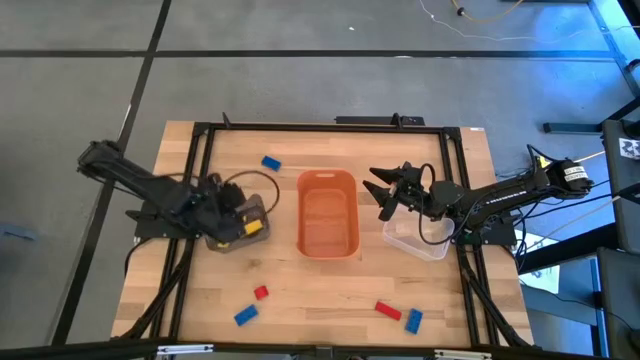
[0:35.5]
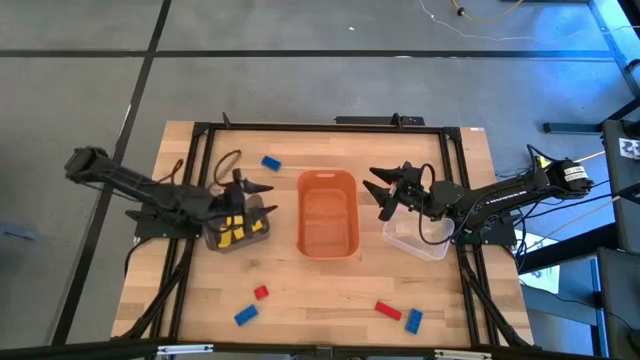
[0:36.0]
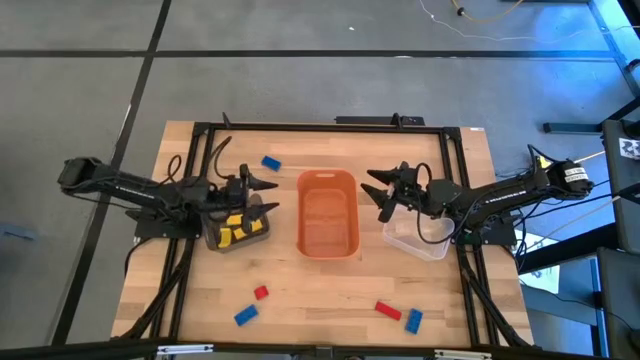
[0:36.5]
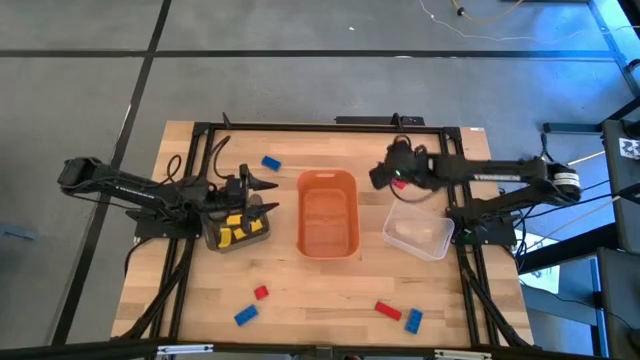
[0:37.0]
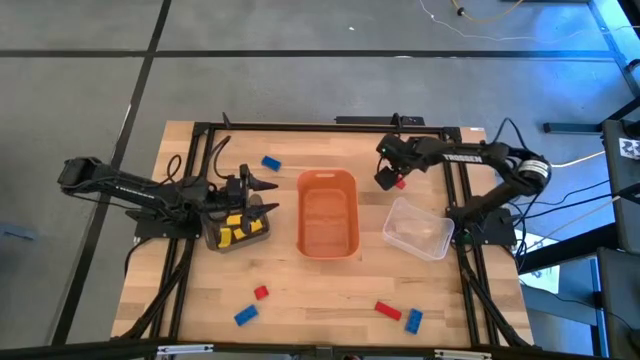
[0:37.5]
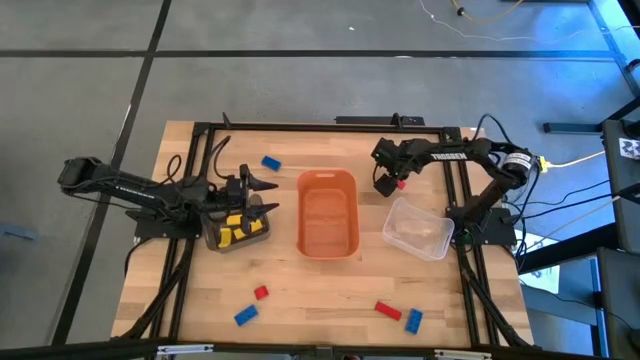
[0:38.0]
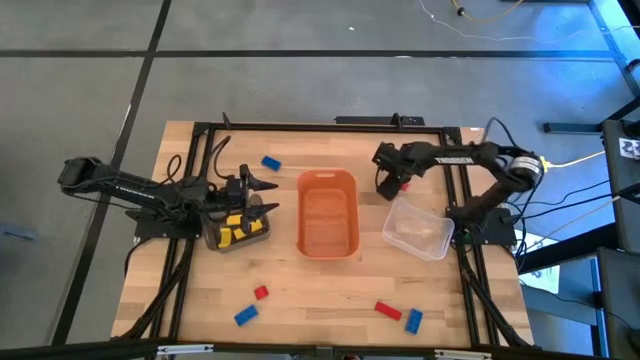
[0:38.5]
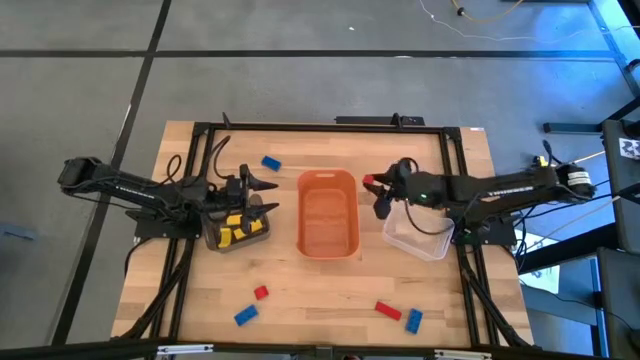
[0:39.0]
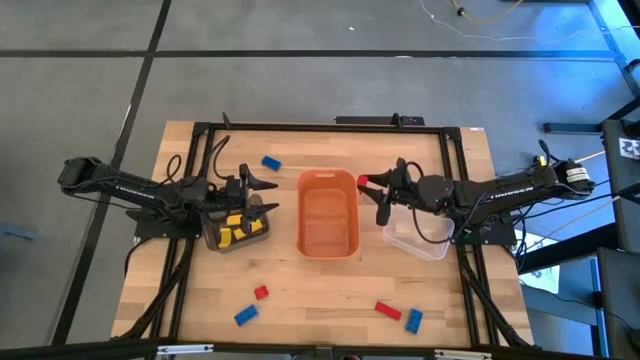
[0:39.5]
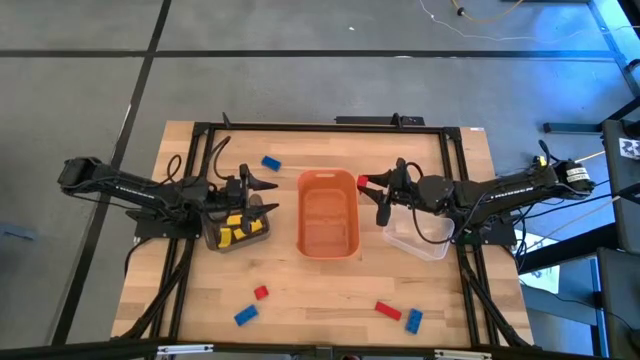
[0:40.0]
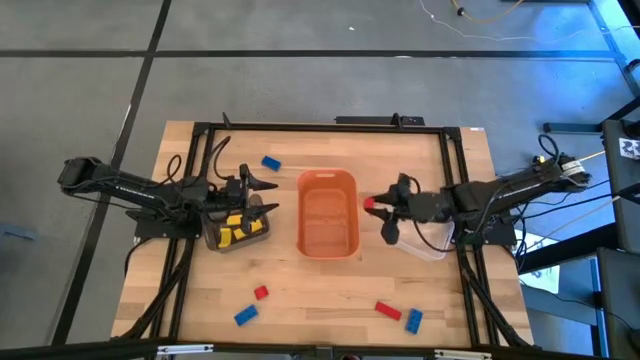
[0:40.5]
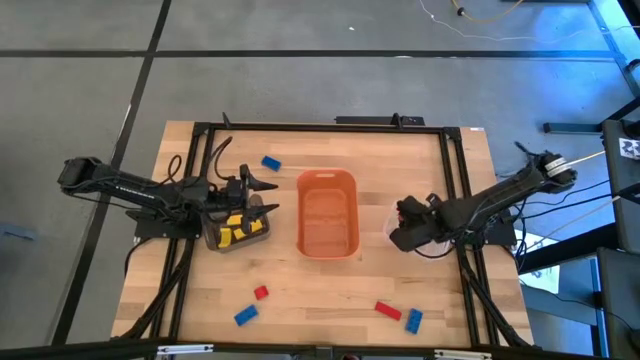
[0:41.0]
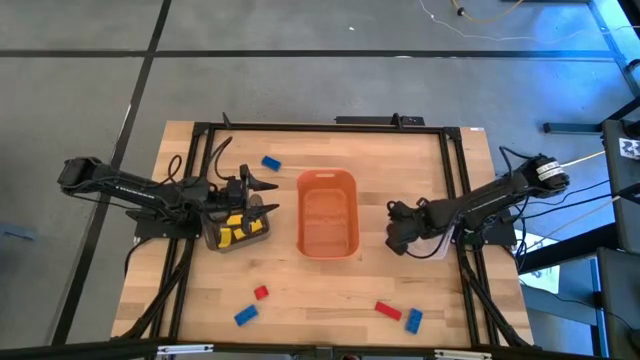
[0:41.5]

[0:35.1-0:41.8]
Task: Sort & place blocks by color
Put the top red block into the transparent bin

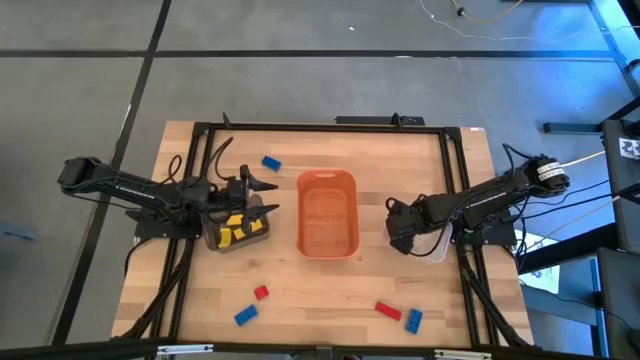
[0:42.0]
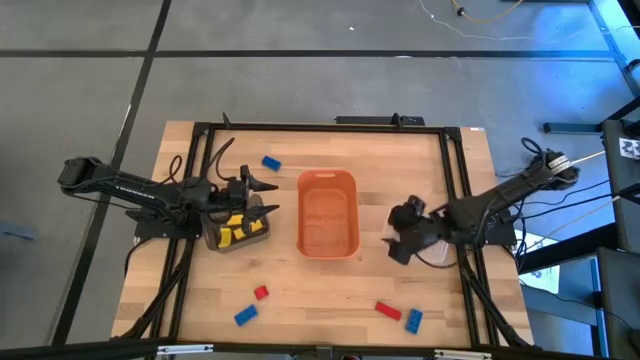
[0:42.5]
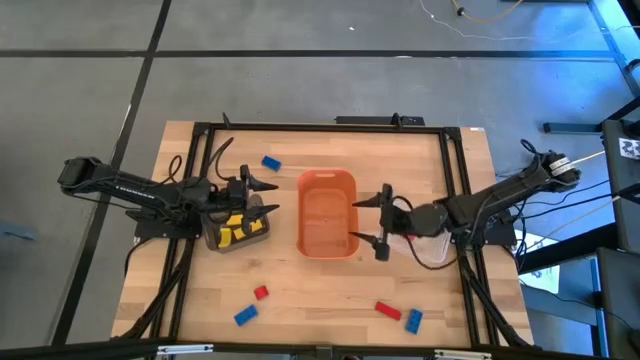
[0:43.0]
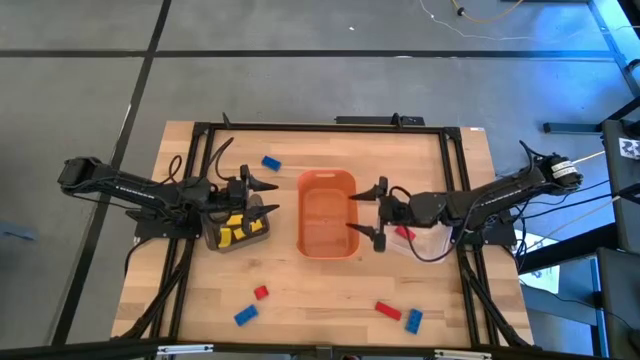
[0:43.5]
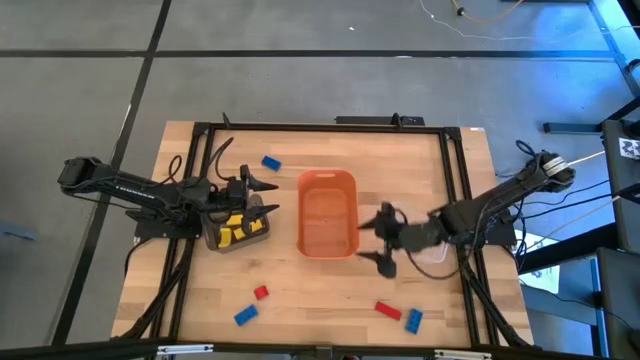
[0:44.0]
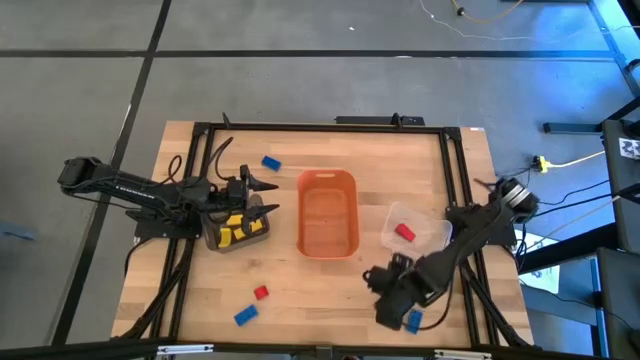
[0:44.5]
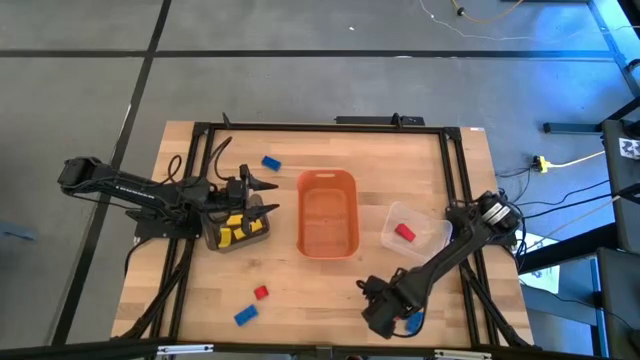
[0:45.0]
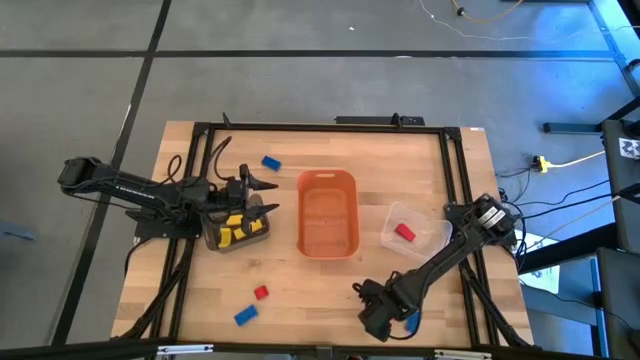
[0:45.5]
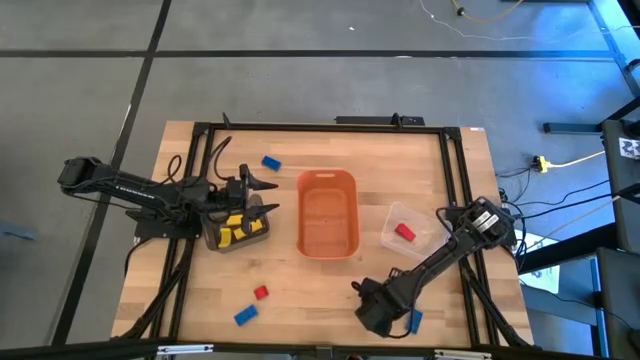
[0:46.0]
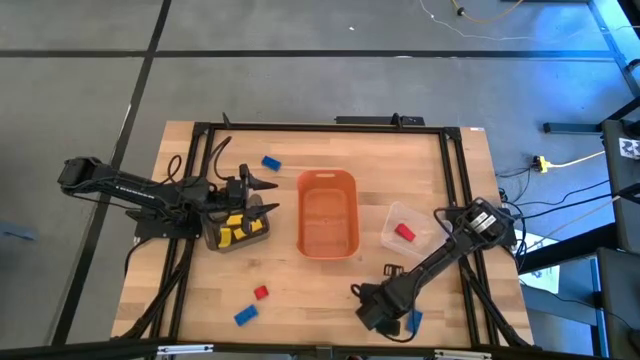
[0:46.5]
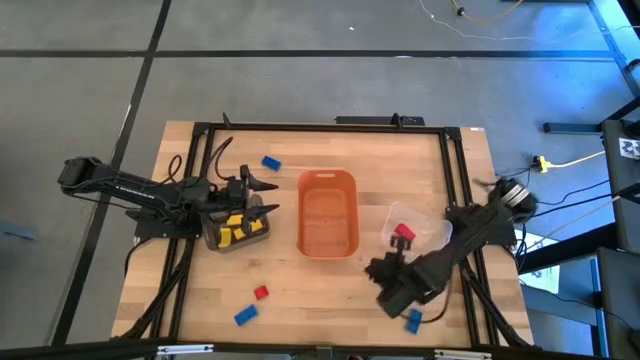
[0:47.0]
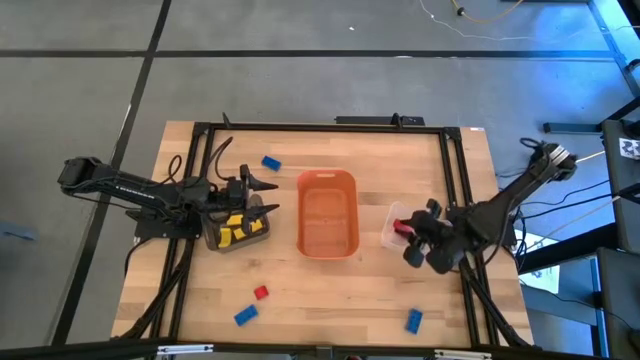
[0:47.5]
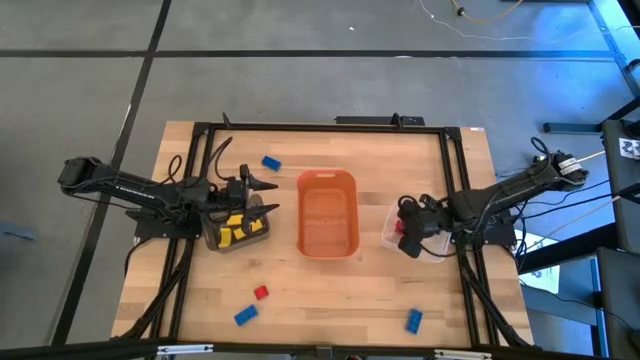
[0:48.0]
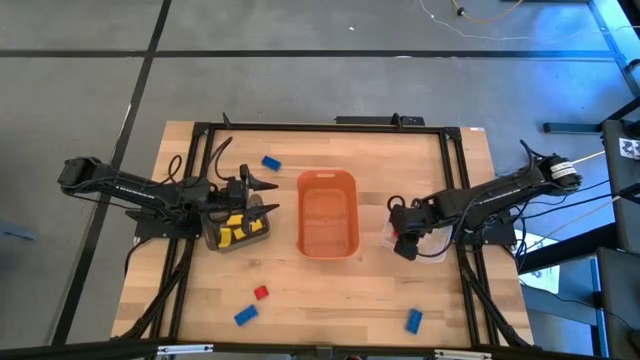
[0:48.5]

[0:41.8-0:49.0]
Put the right red block into the transparent bin

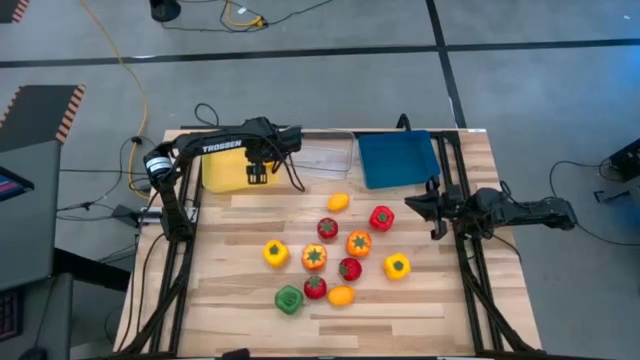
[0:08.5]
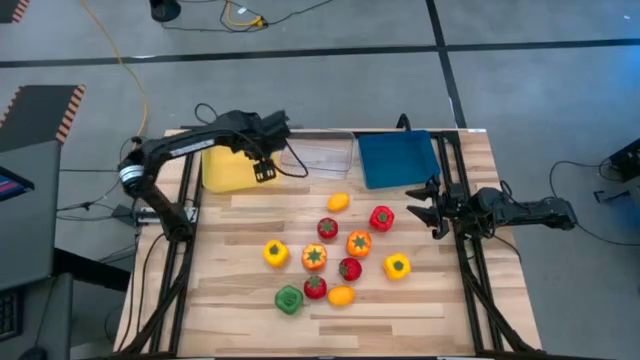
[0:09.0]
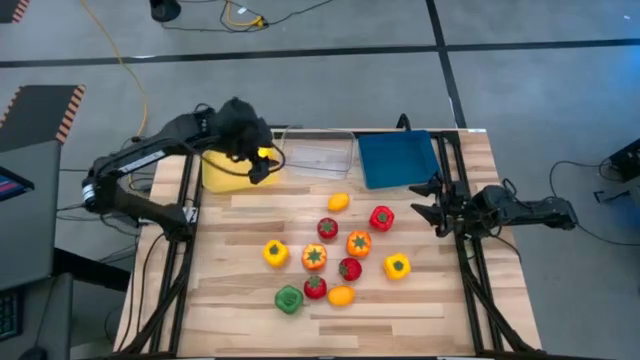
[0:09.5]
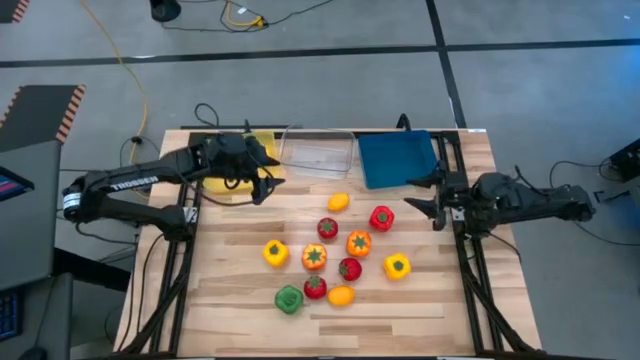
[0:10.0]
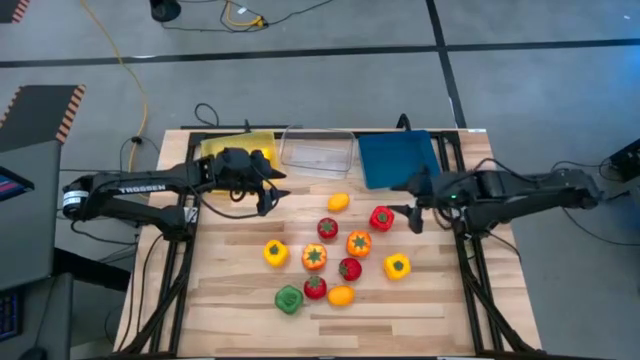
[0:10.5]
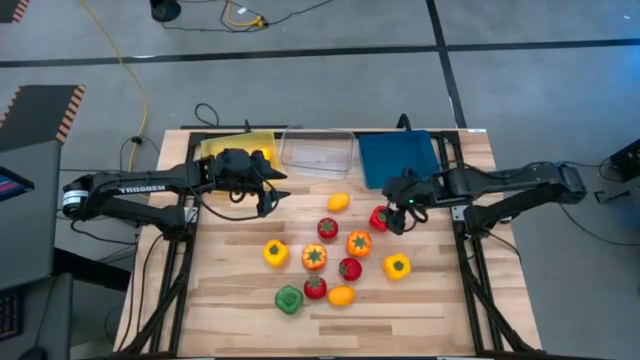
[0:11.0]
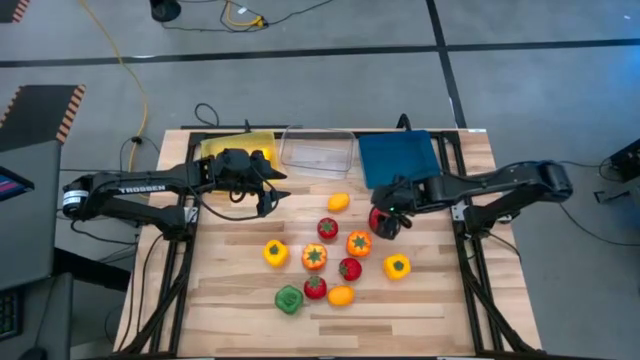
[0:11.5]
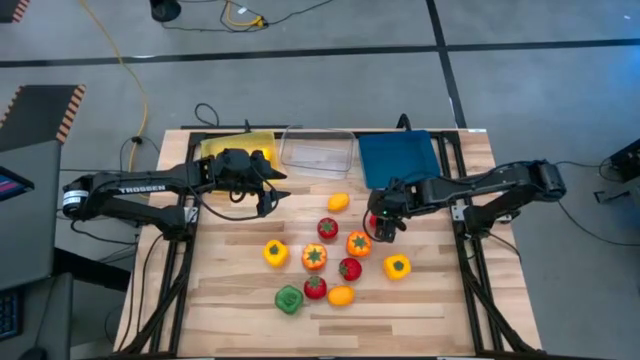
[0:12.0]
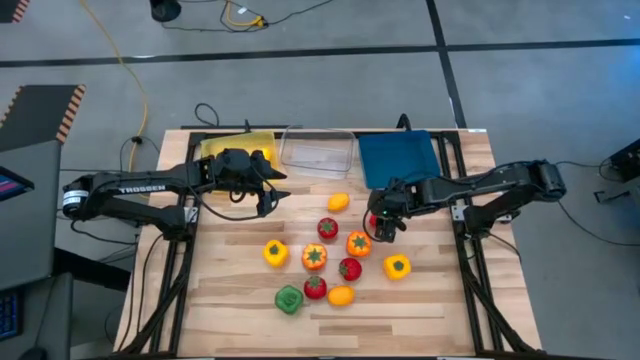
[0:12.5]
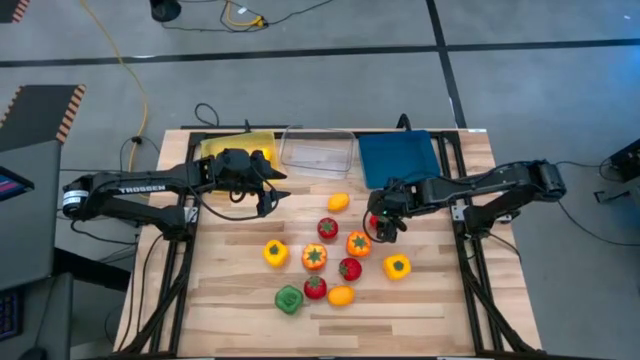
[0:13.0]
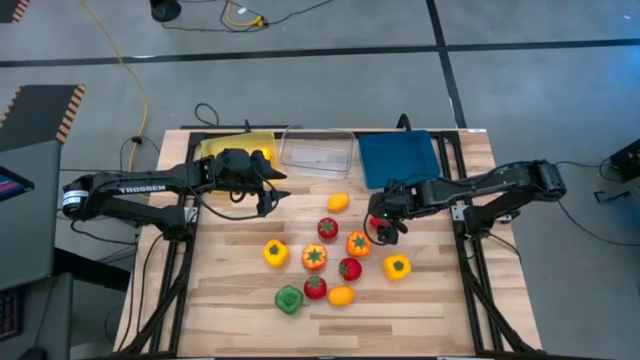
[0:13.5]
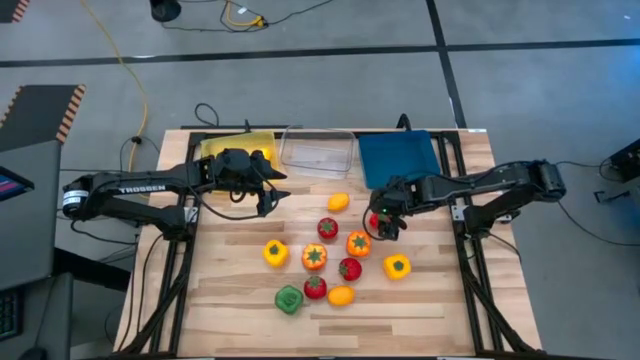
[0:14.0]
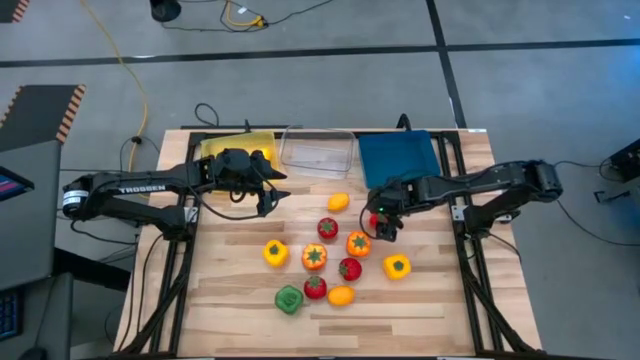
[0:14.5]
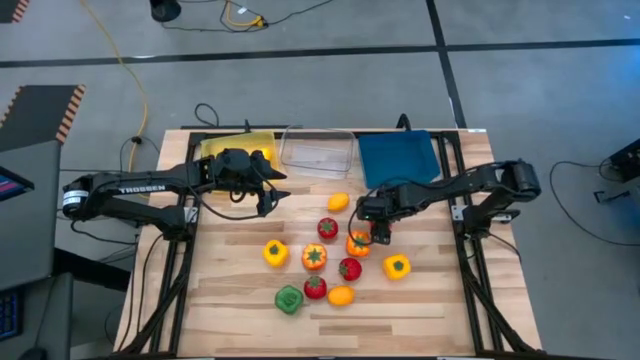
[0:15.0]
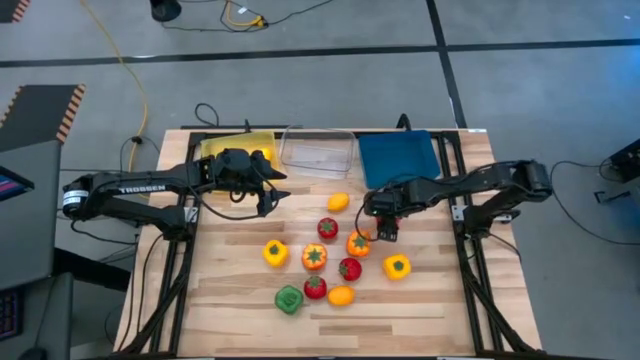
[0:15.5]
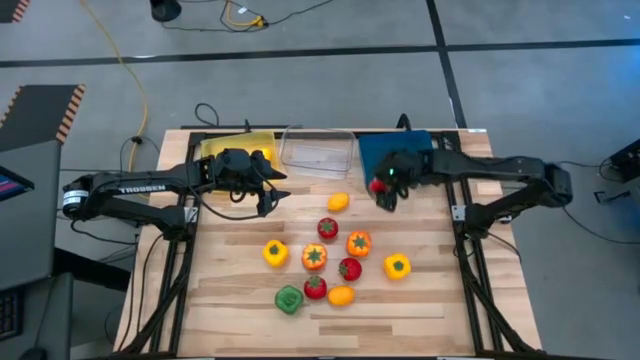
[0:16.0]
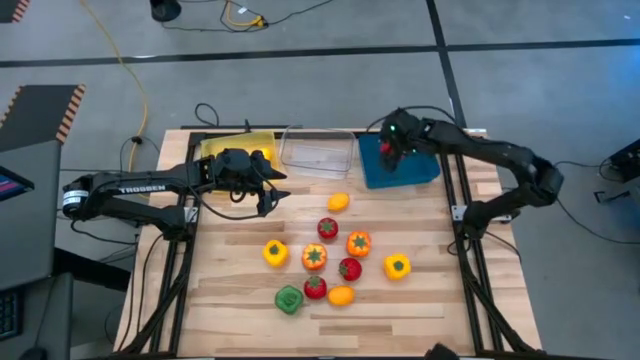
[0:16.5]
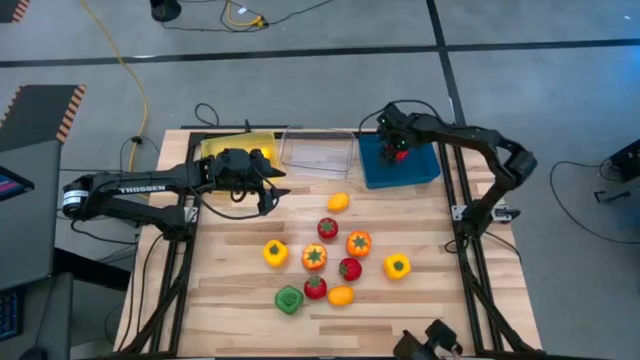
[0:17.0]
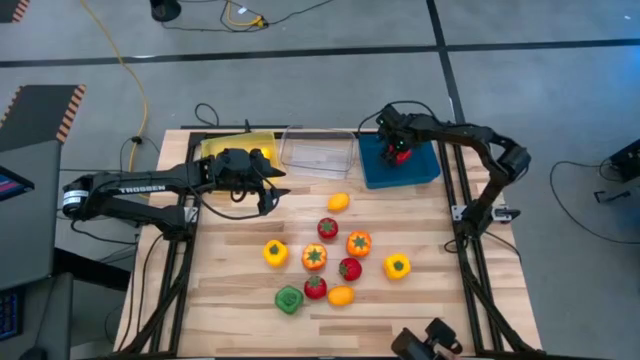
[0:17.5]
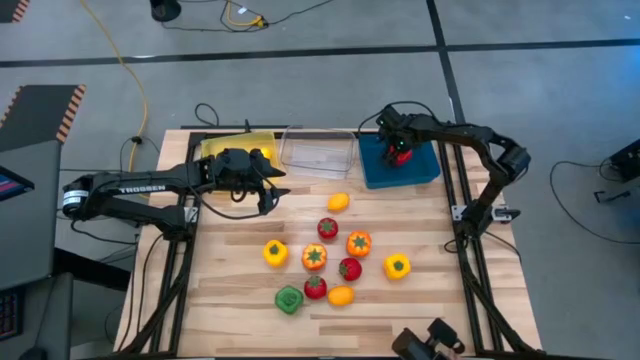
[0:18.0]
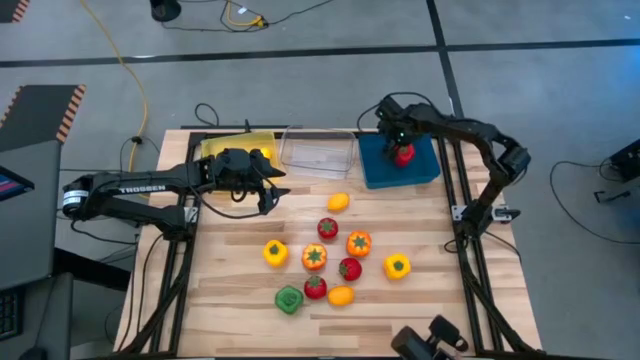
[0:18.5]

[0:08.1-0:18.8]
Task: Sort produce into baskets
Put the red bell pepper into the blue bin
